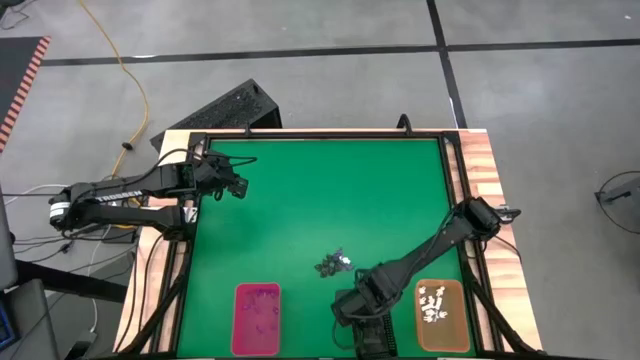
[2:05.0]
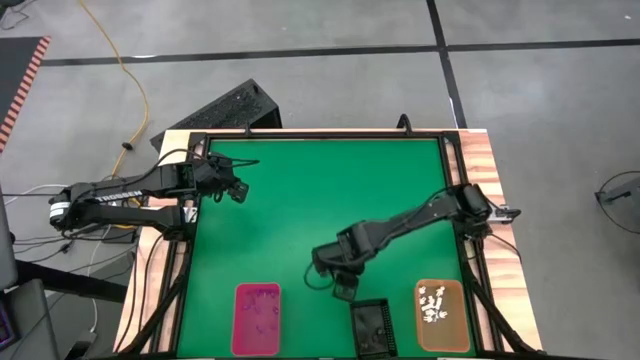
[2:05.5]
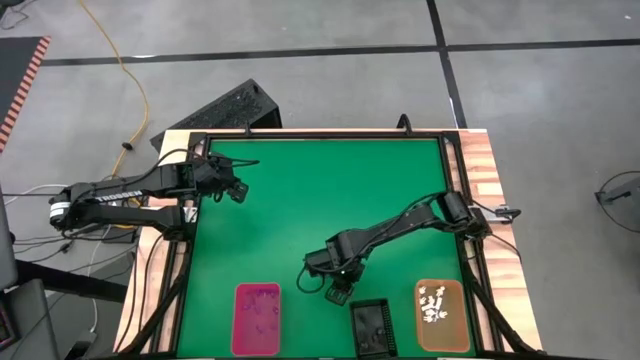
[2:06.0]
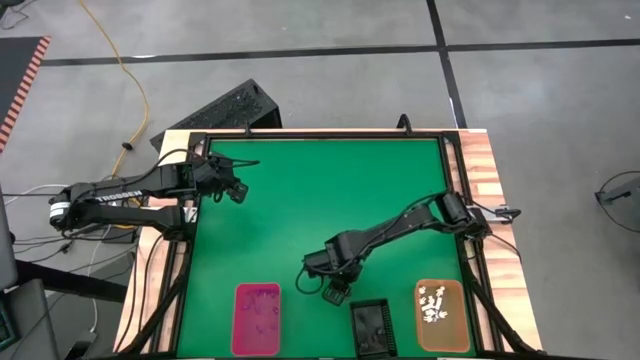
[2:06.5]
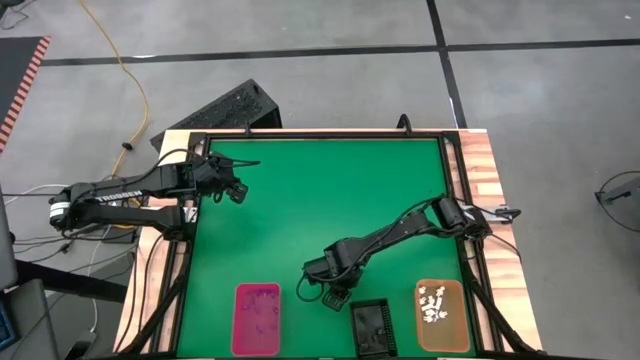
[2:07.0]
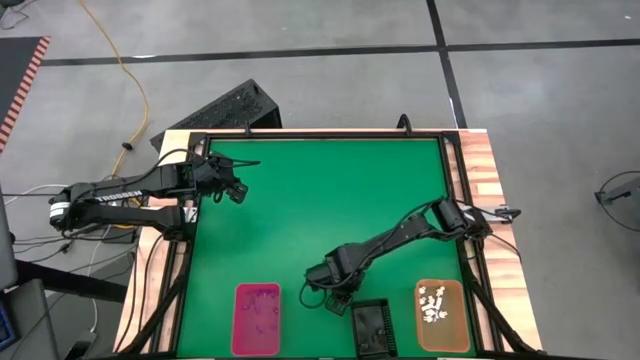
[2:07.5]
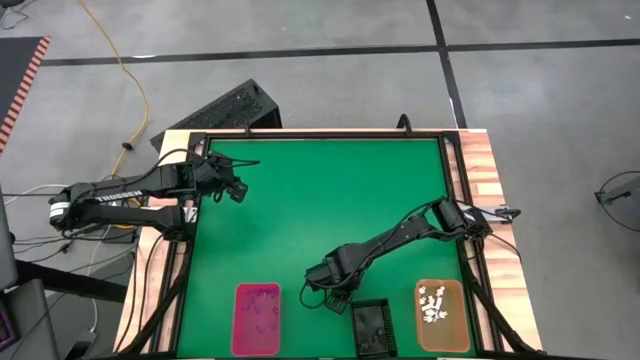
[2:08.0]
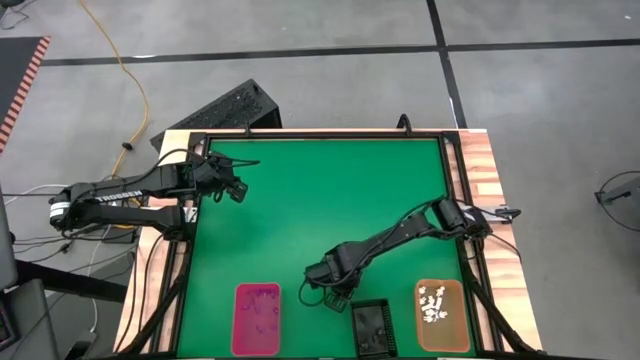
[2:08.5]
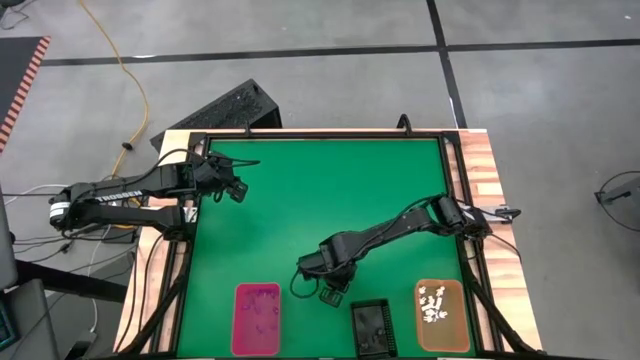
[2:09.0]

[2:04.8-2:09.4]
Task: Sort Halloween decoration
Put the black skull toy into the black organizing bin

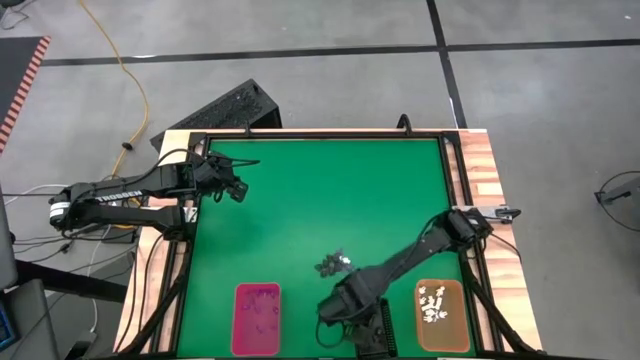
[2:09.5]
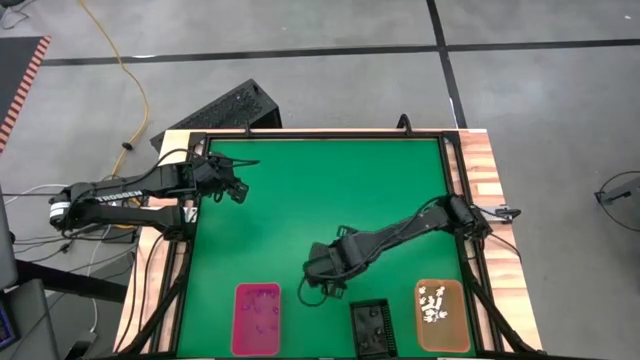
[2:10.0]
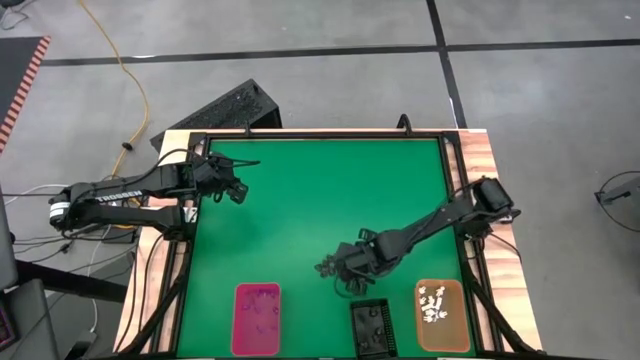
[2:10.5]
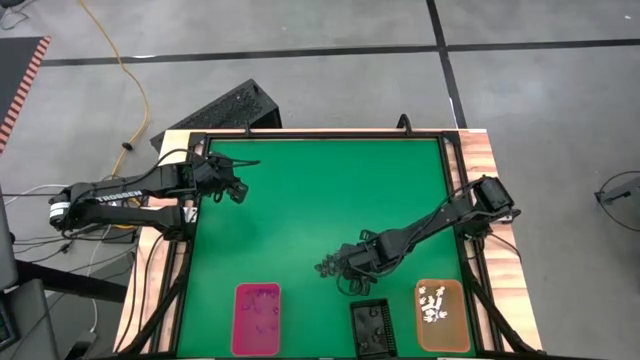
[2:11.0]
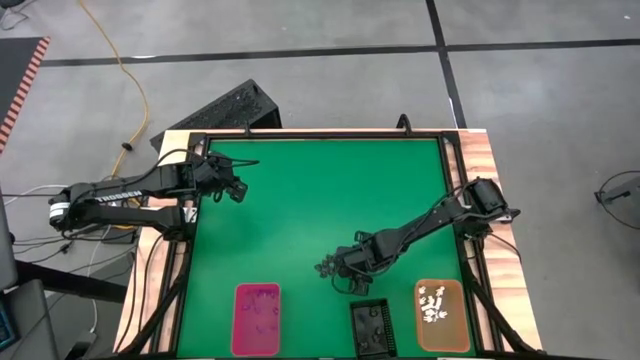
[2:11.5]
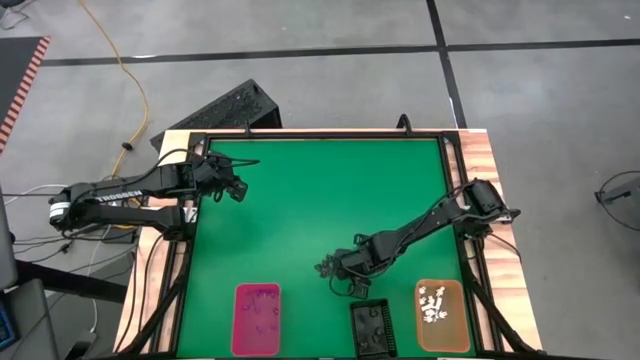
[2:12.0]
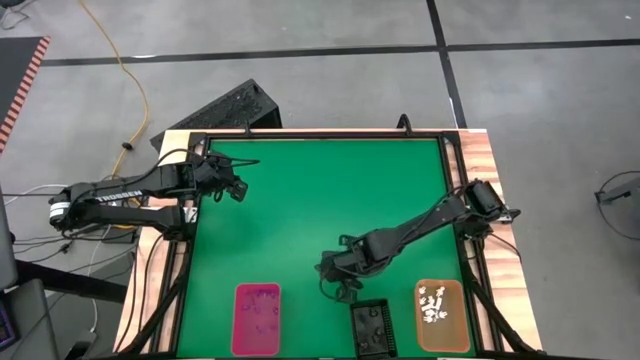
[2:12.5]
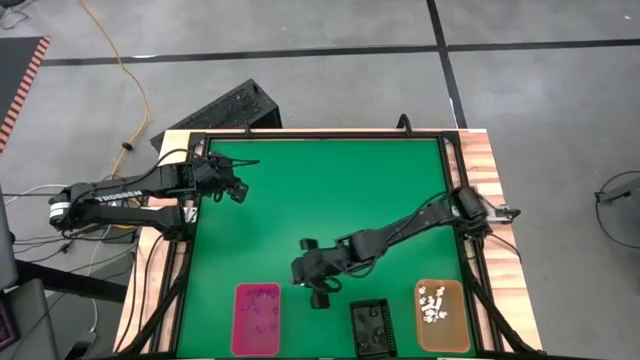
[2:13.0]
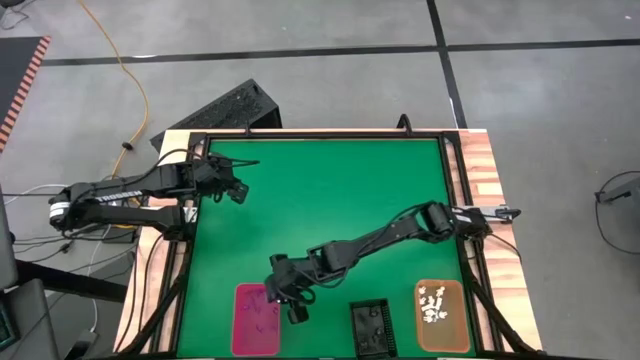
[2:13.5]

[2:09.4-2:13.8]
Put the violet witch hat toy into the red organizing bin

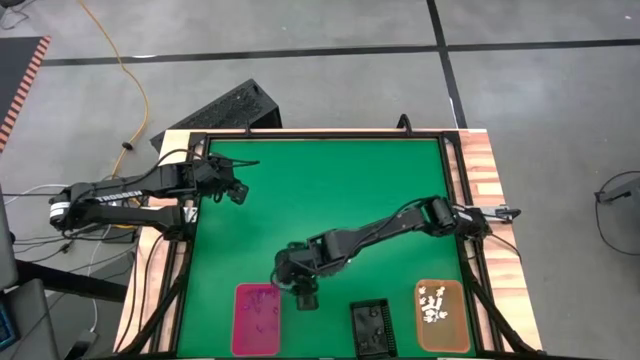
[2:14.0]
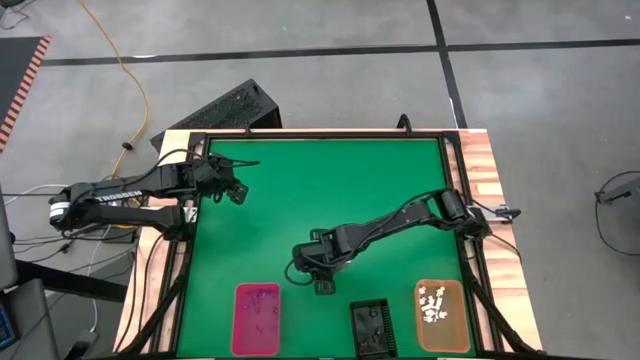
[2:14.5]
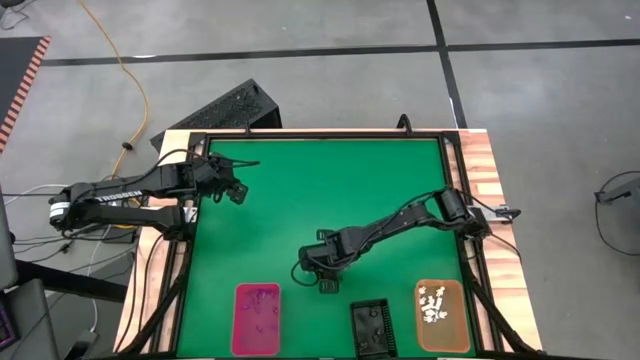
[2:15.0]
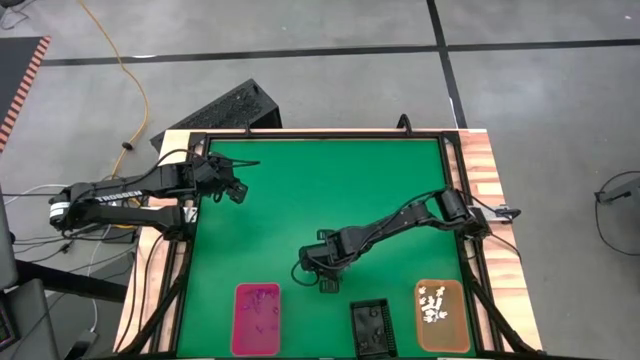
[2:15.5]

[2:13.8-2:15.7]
Put the black skull toy into the black organizing bin

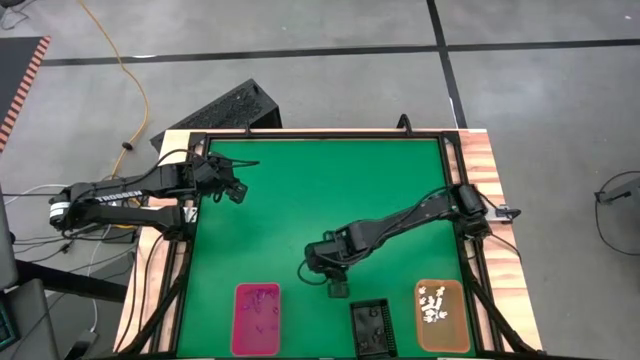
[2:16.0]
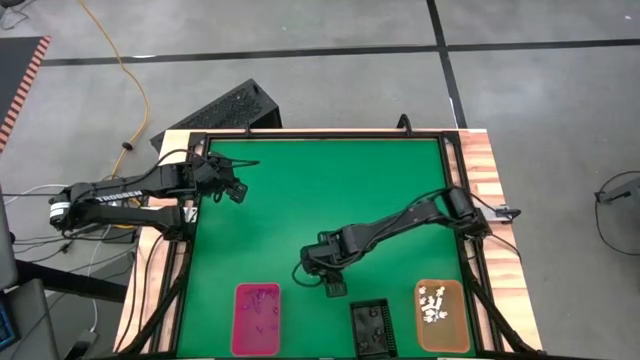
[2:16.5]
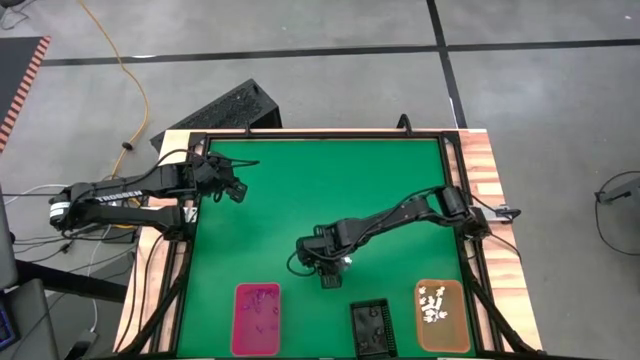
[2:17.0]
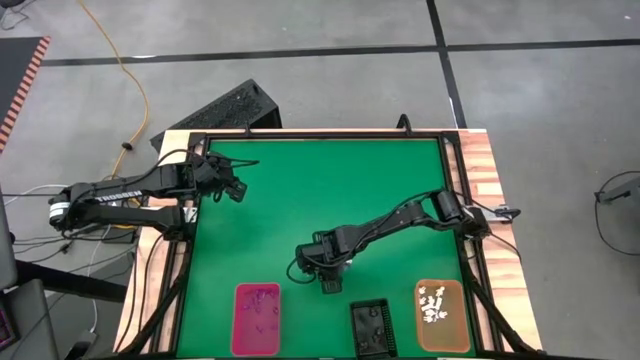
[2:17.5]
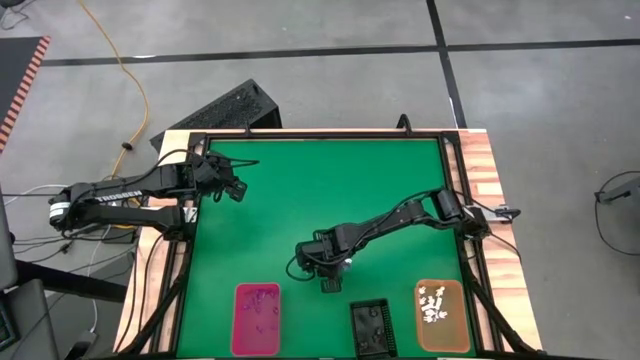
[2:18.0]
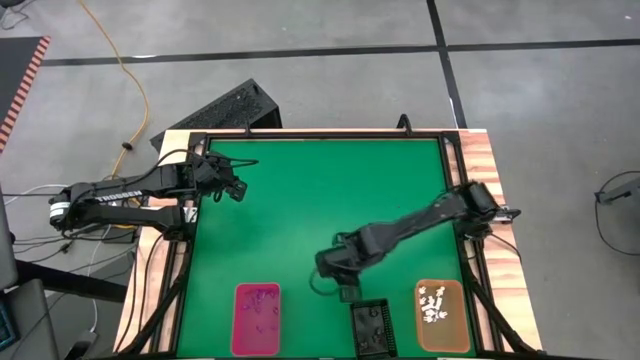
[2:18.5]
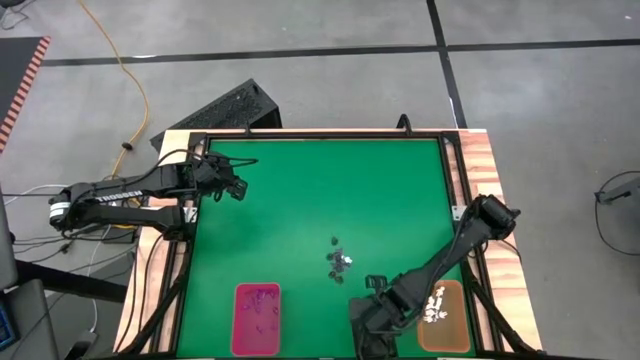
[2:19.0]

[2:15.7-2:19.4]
Put the black skull toy into the black organizing bin

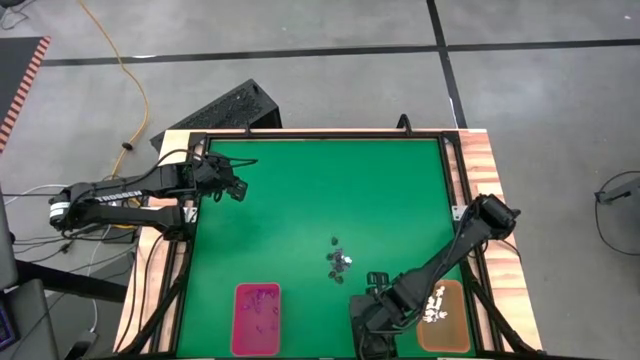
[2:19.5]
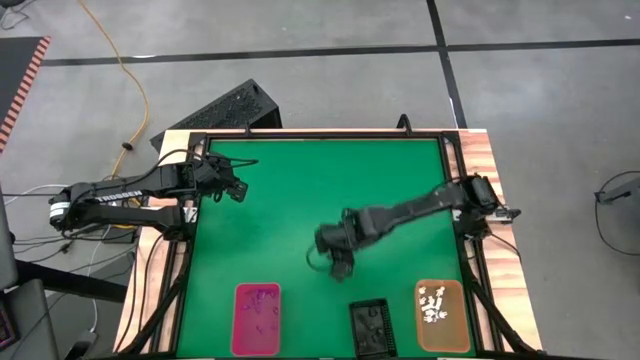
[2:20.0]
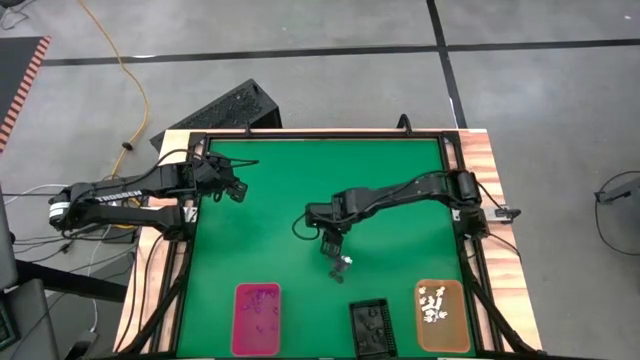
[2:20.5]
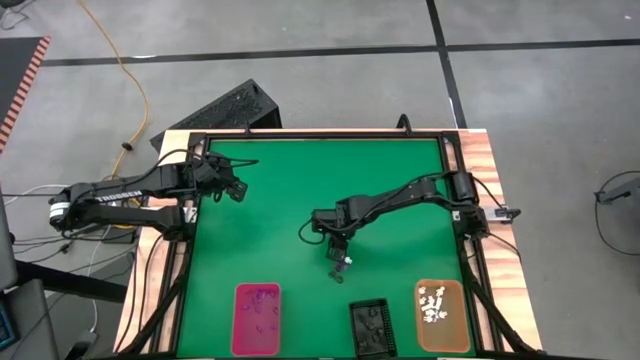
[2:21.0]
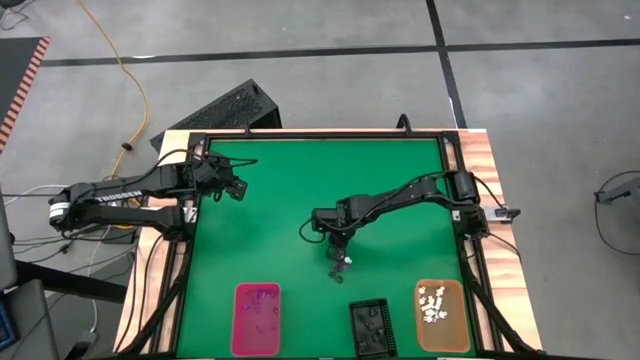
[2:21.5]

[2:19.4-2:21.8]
Put the black skull toy into the black organizing bin

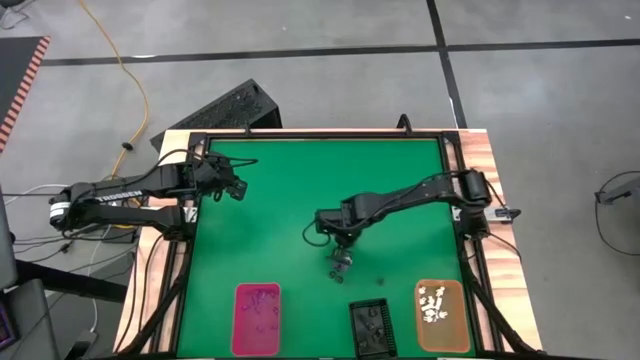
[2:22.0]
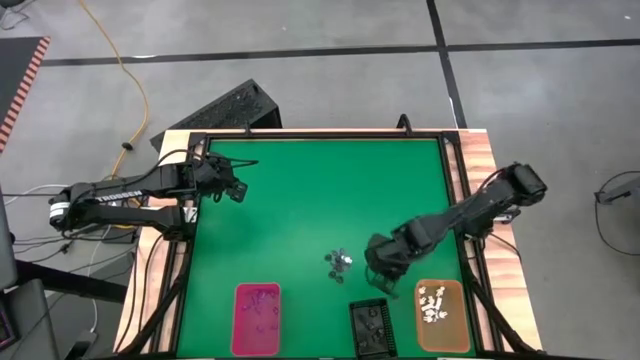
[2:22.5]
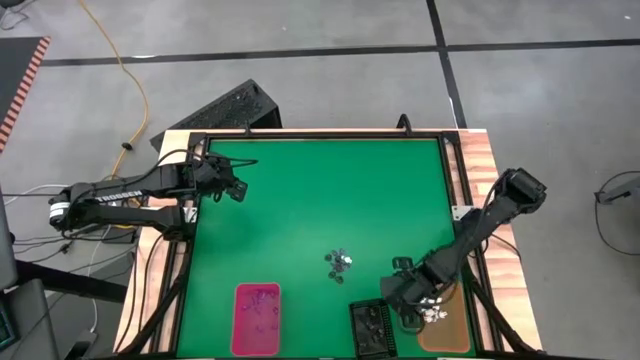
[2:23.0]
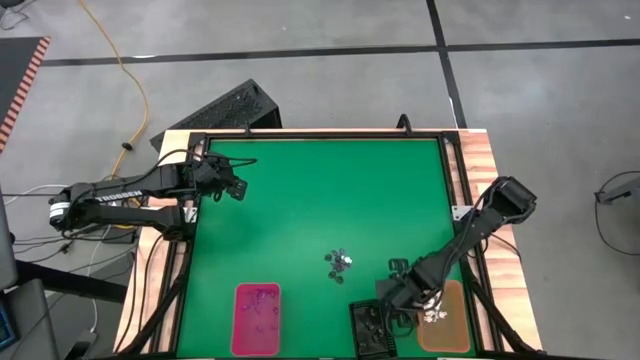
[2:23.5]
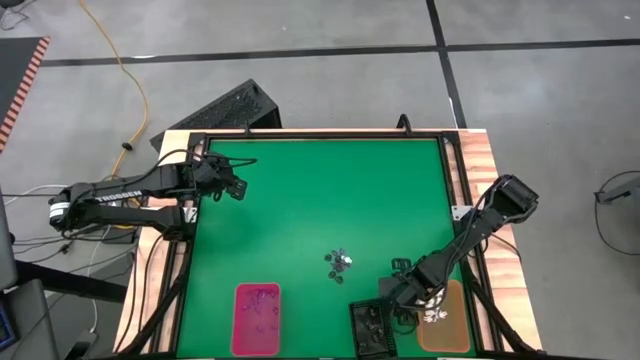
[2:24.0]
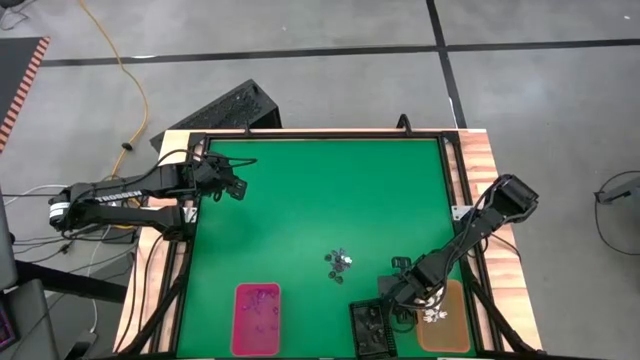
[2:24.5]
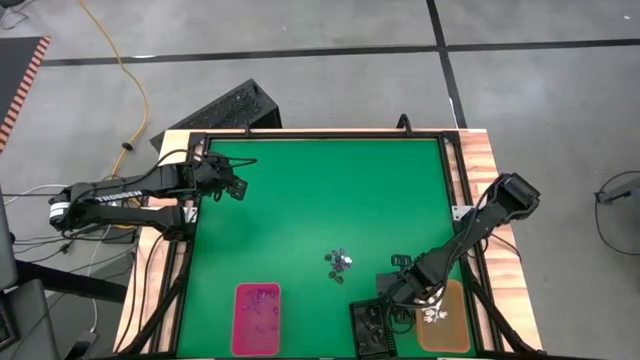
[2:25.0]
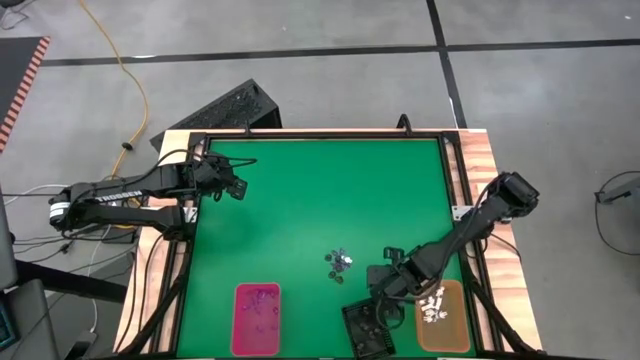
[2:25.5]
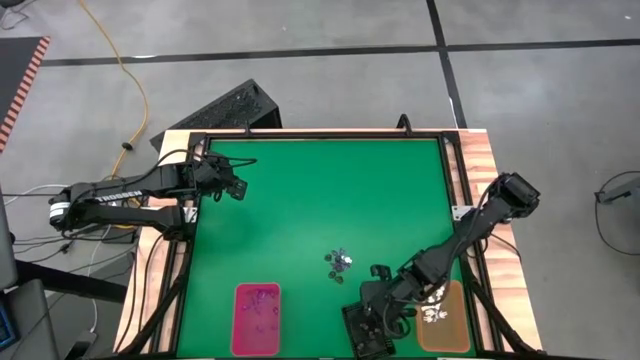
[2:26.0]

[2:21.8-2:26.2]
Put the black skull toy into the black organizing bin
